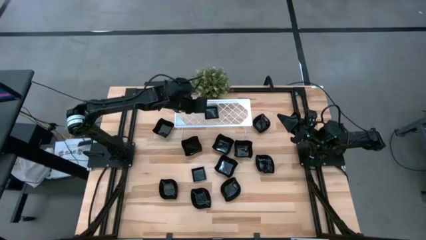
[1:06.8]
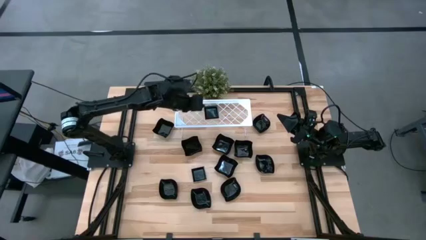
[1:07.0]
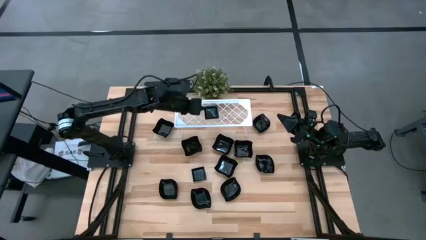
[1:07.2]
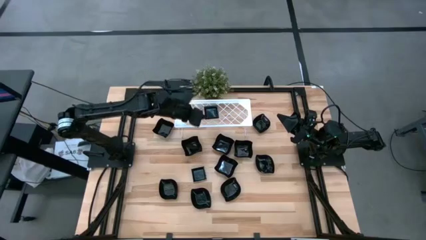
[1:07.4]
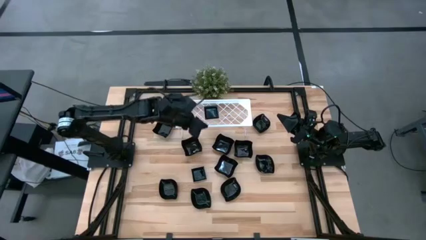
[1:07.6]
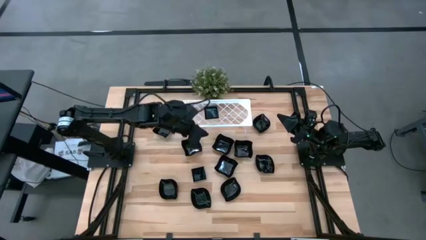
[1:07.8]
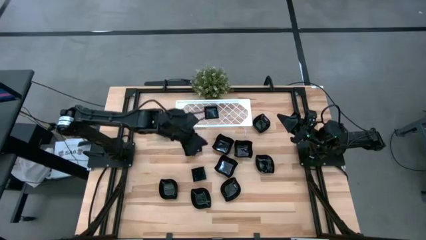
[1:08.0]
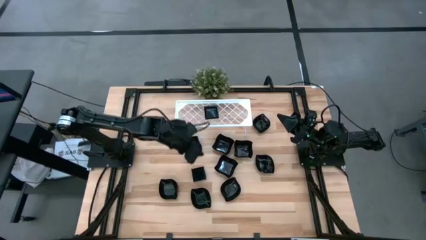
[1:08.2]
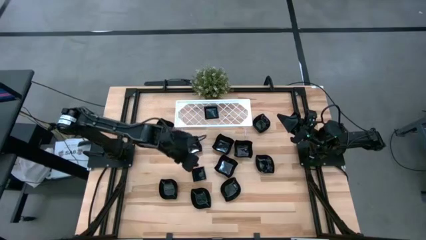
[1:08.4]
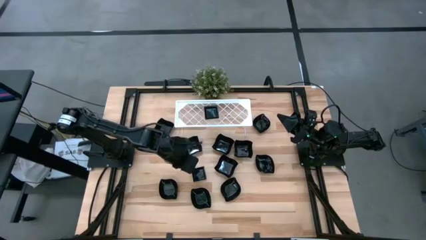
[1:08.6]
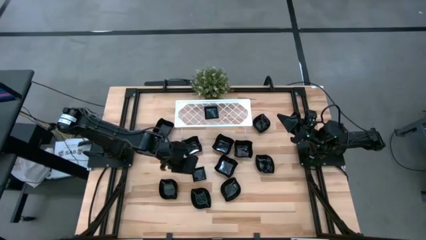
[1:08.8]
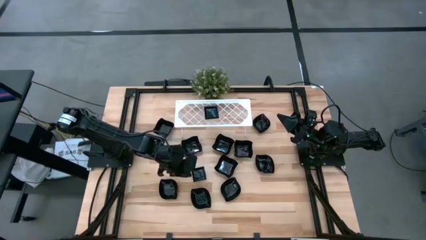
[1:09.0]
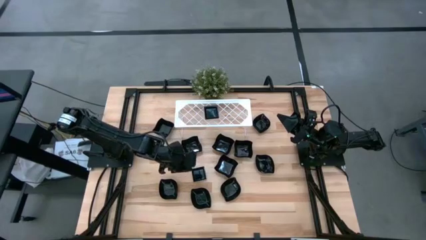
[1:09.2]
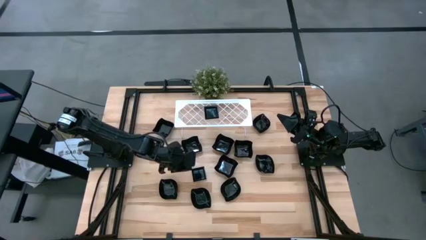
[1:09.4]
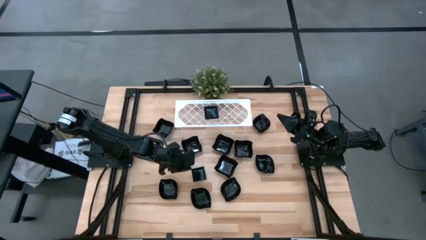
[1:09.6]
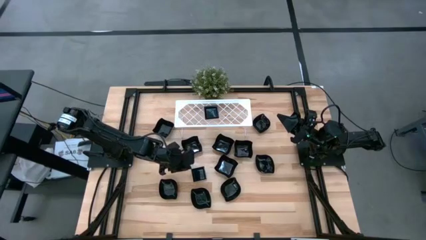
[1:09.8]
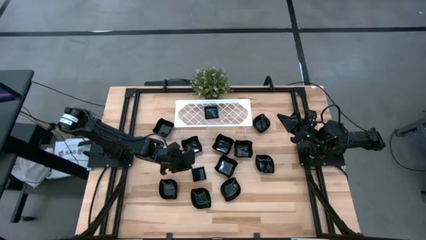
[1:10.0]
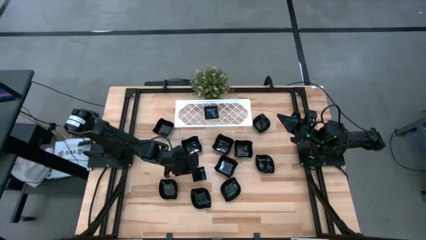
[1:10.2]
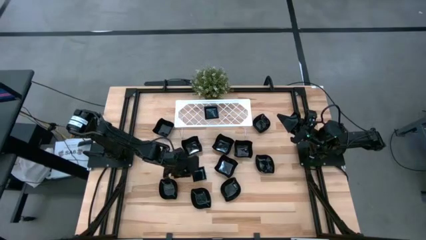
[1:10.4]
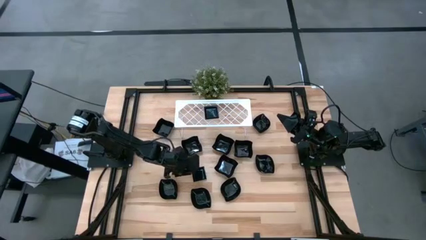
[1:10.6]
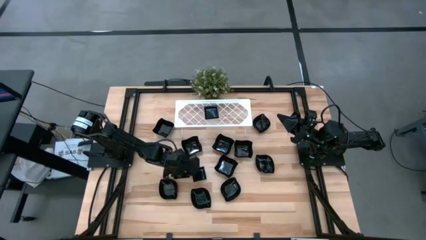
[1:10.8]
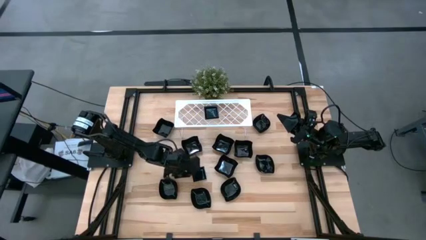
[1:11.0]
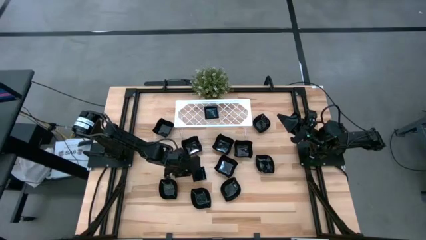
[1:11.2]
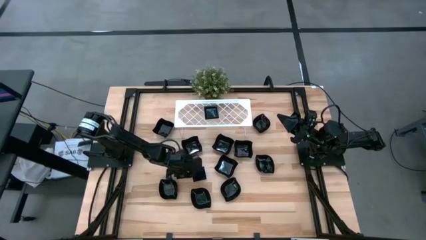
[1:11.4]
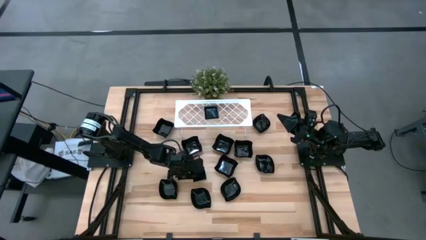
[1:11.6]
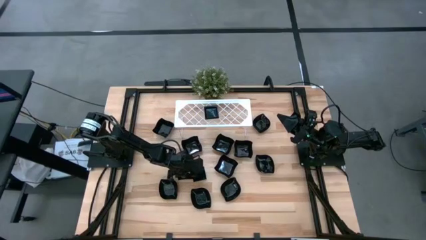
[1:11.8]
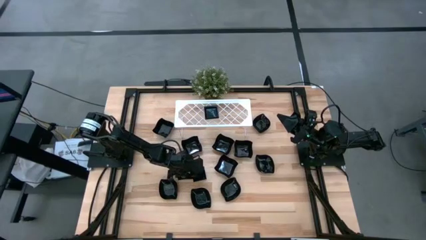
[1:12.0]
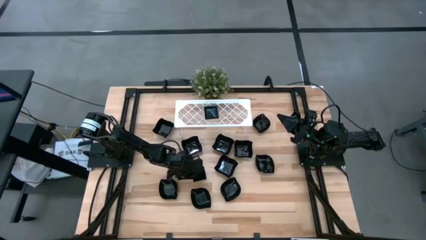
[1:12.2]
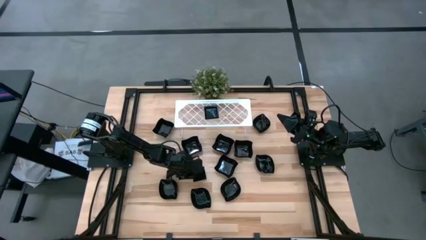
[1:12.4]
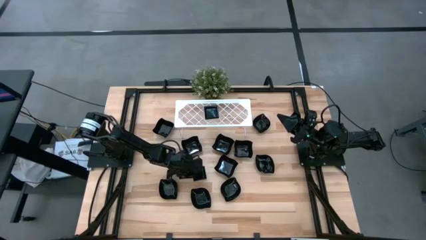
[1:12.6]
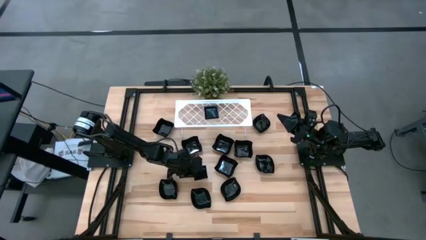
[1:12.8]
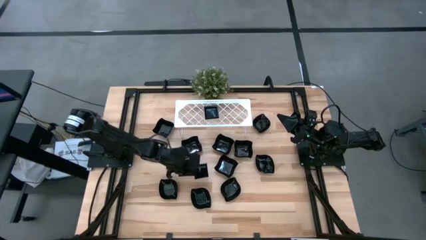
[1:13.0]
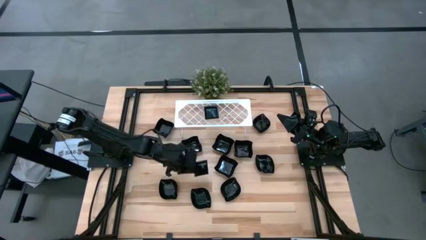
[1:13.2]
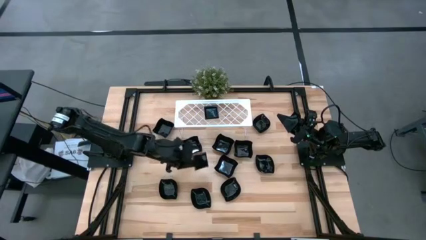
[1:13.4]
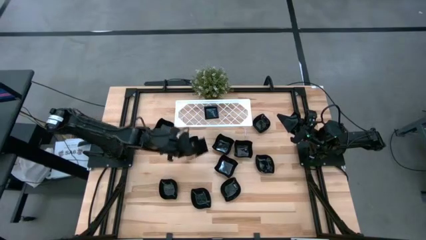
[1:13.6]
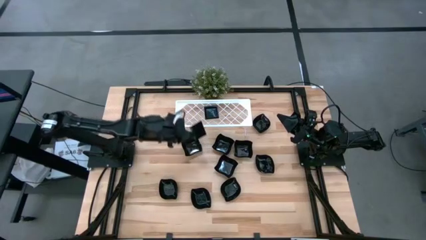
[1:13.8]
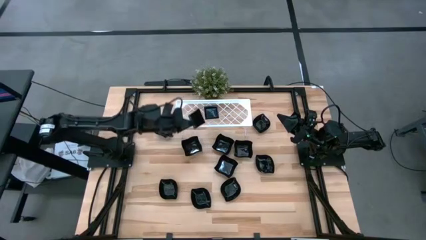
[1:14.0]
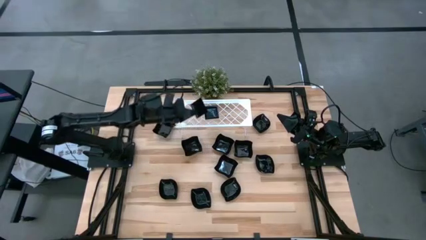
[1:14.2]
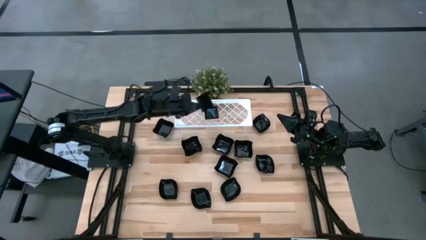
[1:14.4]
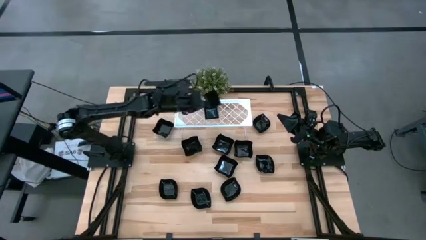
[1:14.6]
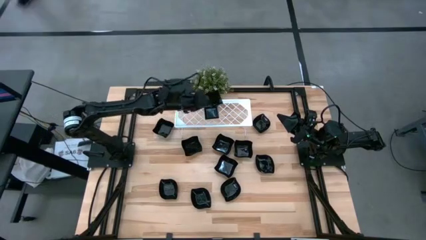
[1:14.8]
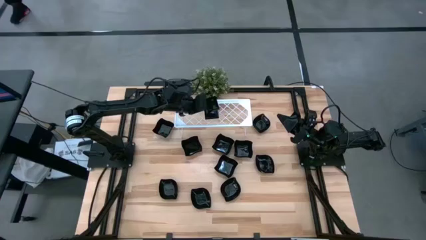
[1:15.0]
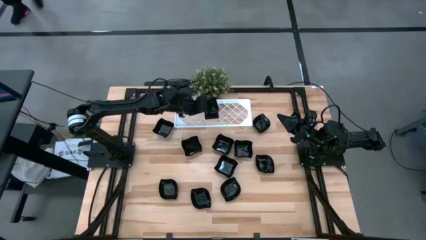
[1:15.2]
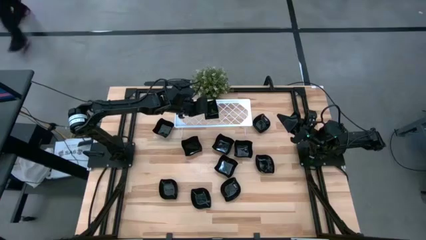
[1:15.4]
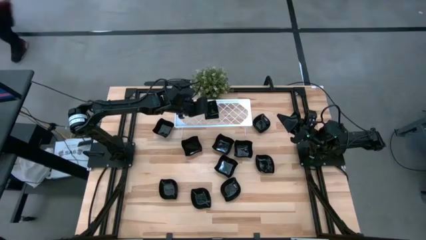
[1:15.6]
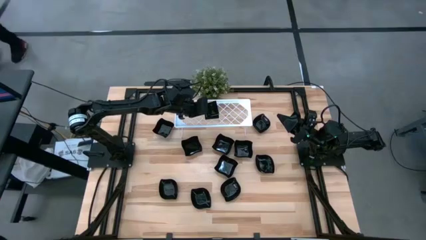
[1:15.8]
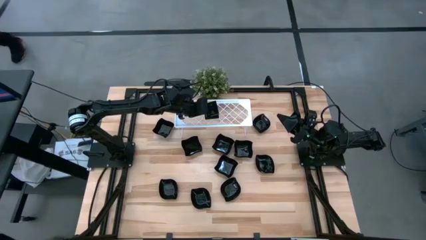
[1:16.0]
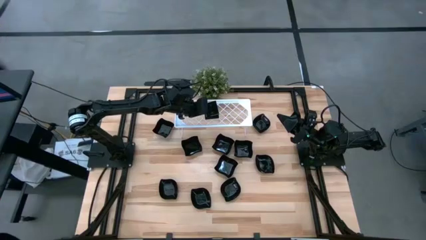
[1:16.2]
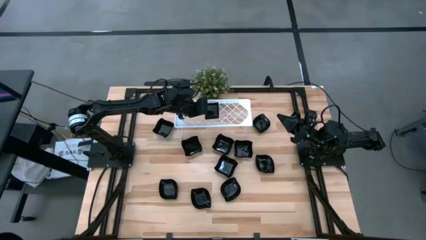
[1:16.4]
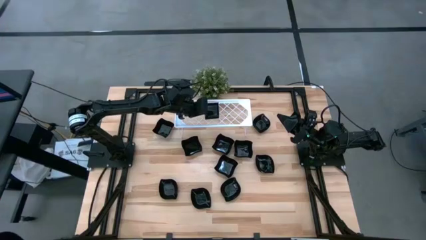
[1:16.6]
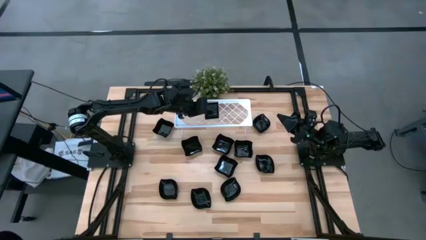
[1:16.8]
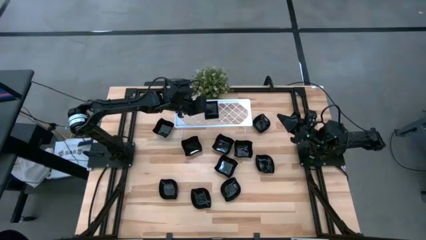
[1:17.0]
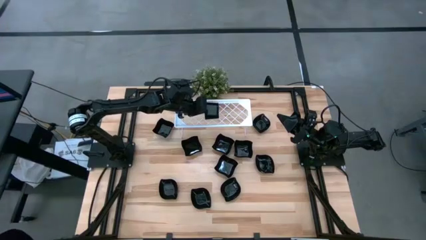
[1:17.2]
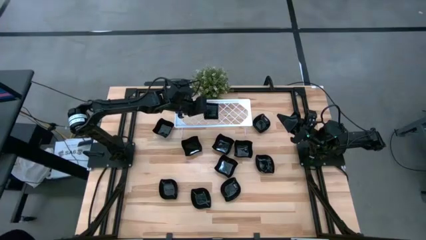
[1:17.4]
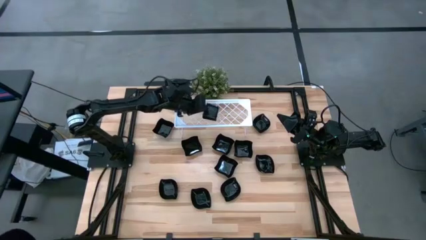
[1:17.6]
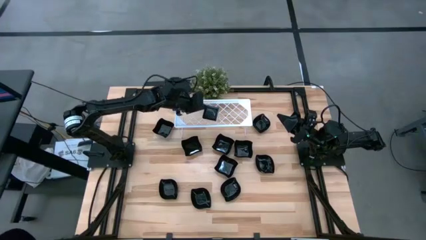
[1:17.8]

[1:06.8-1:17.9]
Task: Pick & Place Mini shaped plates
Stack the square plate on top of the stacked square plate on the shelf

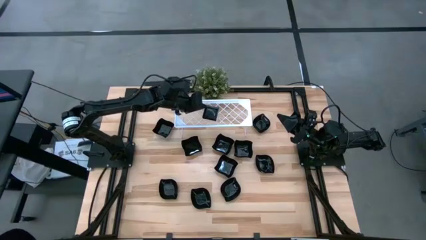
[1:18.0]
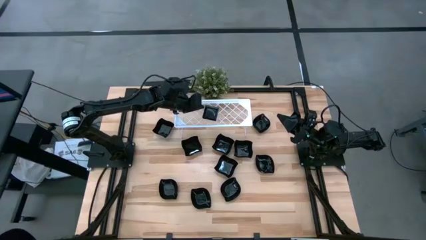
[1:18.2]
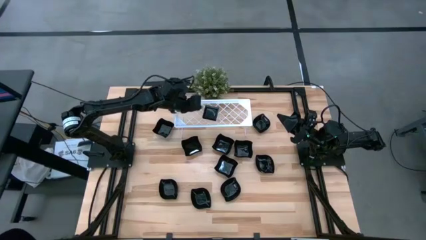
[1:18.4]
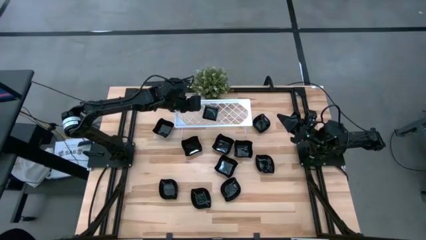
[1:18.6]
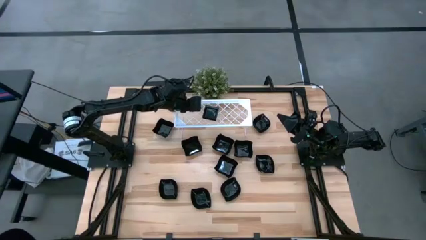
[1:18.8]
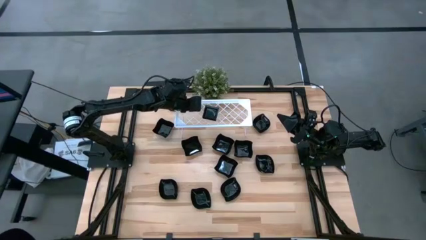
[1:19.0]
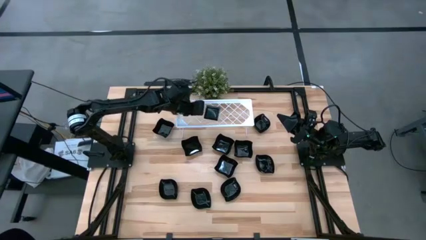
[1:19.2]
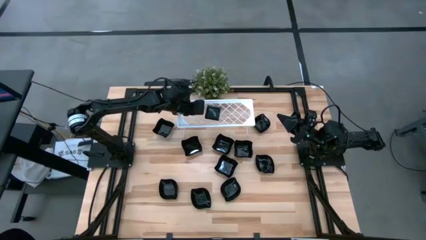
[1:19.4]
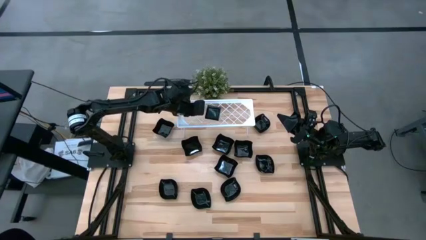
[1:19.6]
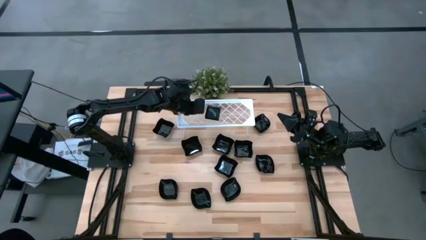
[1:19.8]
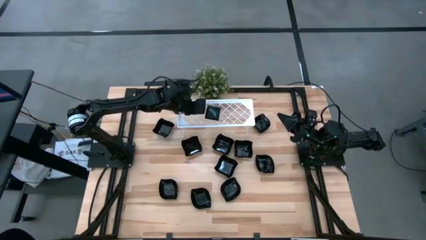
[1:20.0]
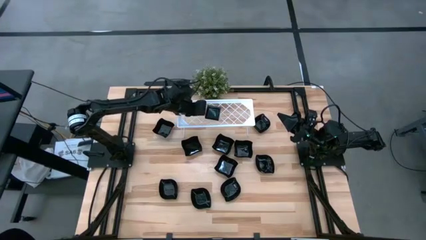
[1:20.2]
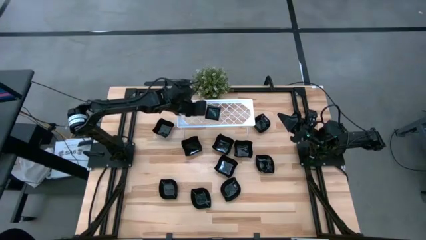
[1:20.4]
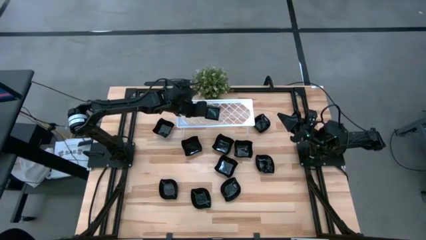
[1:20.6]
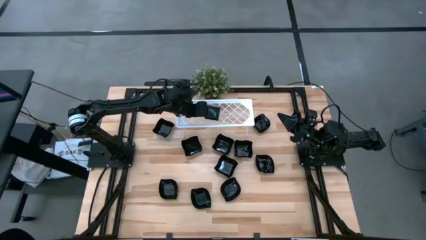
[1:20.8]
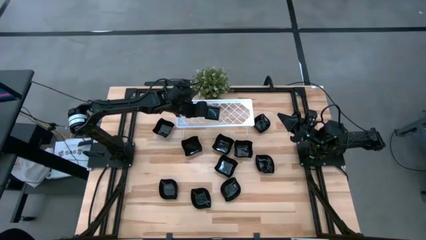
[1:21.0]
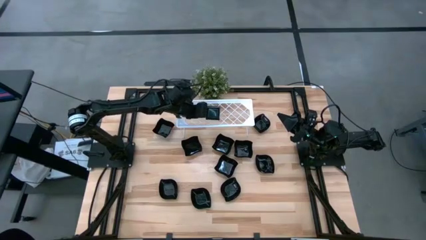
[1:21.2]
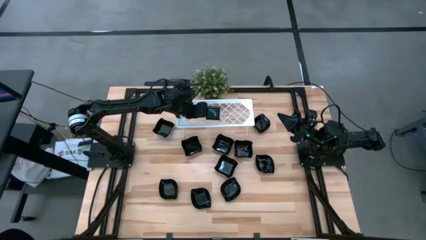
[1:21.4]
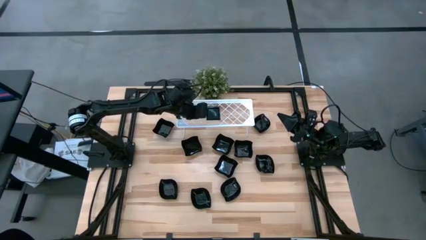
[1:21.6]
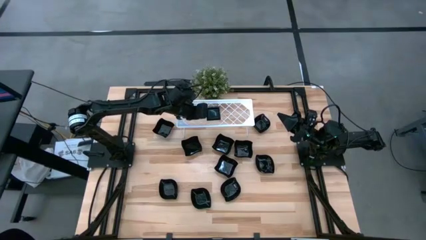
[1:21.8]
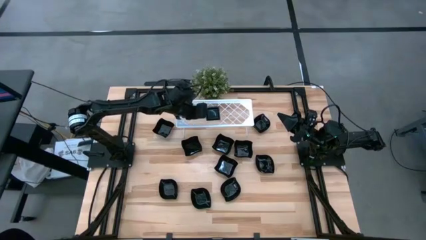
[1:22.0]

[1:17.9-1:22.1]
Adjust the stacked square plate on the shelf

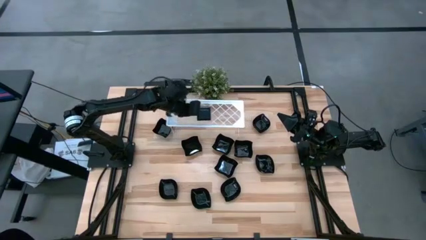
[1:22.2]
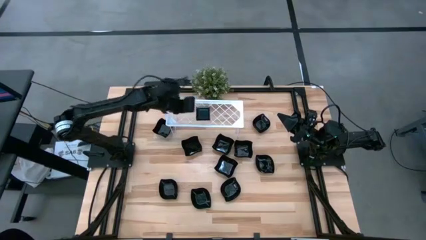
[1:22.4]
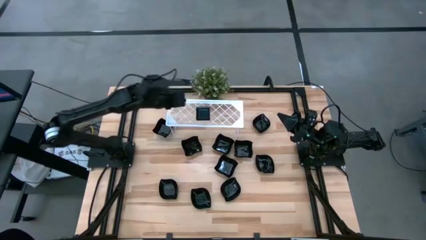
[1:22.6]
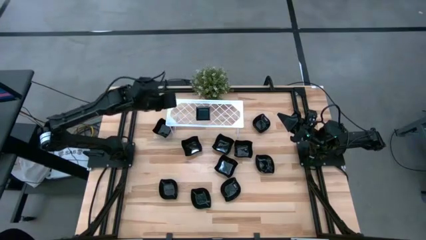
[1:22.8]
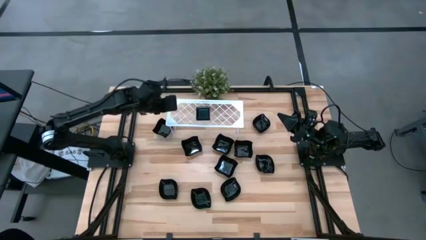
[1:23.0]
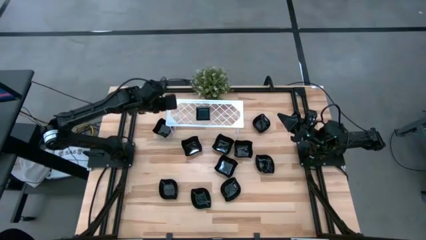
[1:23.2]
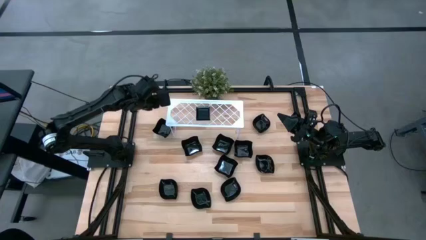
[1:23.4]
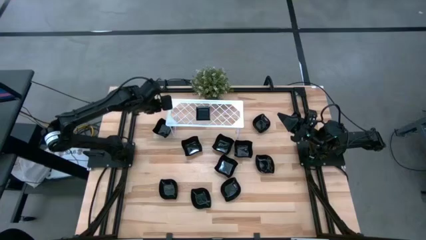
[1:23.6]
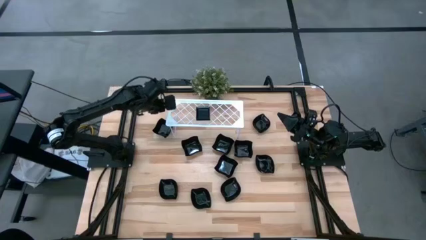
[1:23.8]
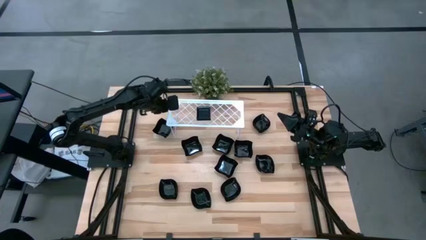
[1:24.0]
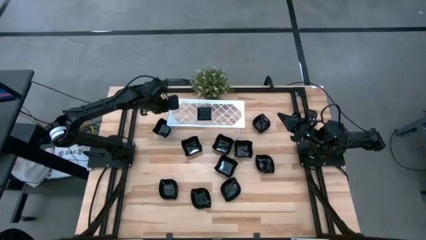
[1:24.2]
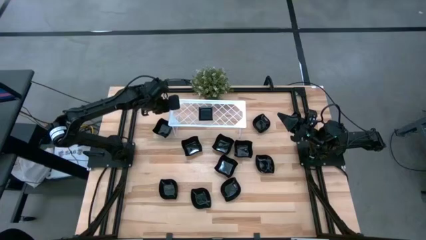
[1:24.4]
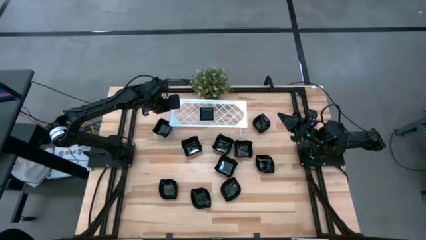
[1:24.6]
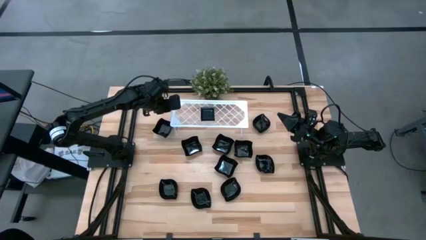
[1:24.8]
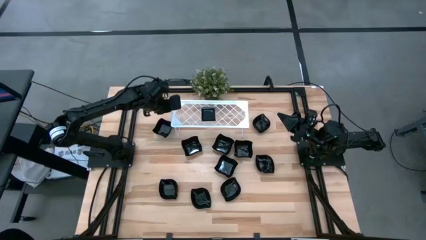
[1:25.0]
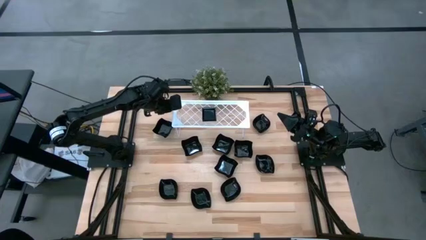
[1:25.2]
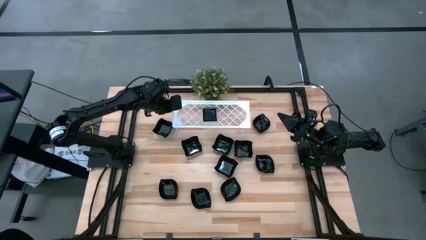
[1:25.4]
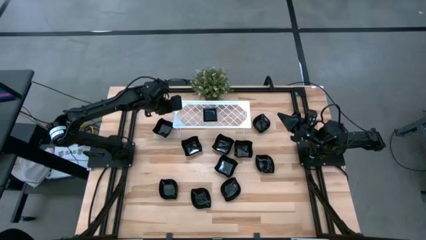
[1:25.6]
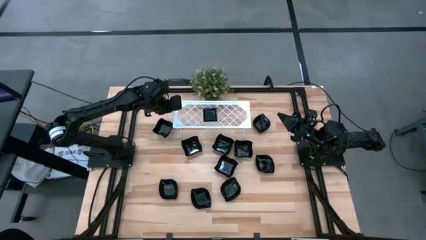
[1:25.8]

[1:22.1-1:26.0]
Adjust the shelf
